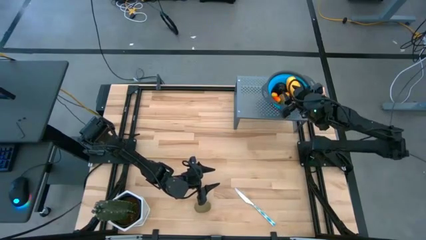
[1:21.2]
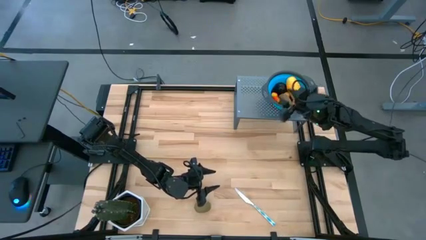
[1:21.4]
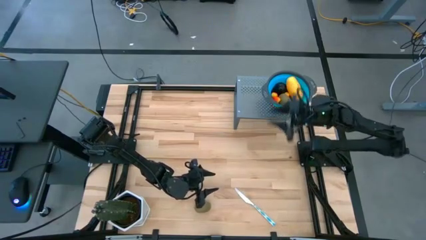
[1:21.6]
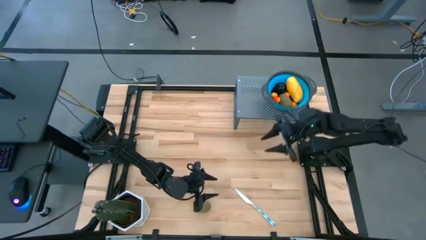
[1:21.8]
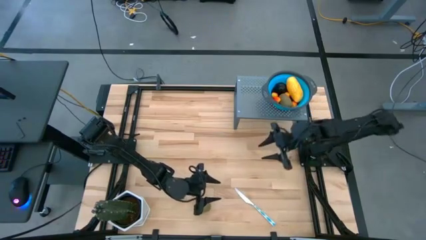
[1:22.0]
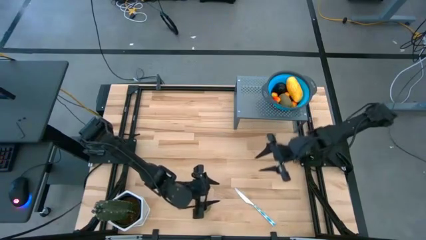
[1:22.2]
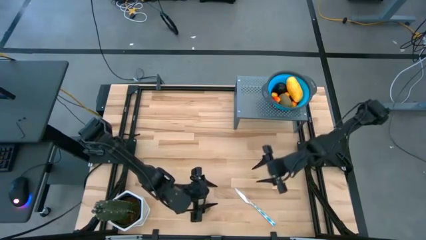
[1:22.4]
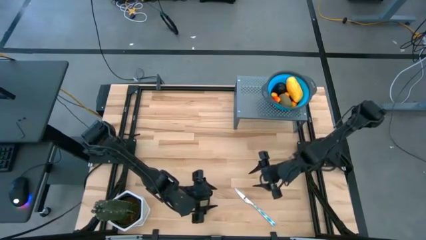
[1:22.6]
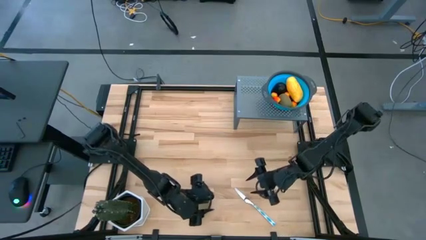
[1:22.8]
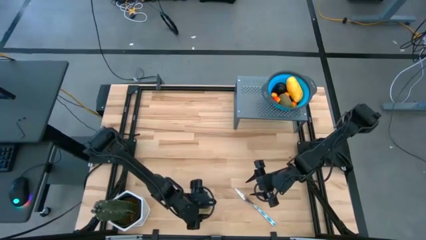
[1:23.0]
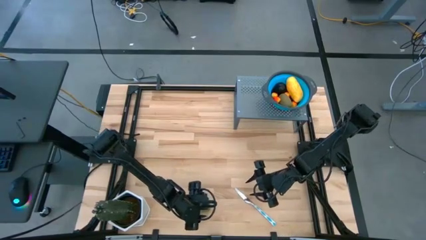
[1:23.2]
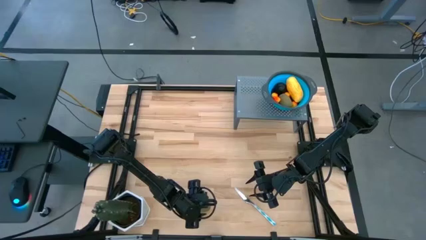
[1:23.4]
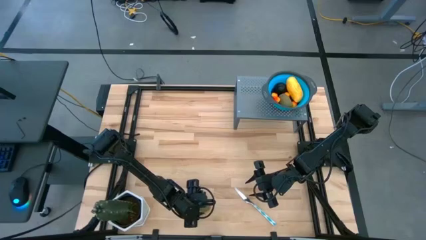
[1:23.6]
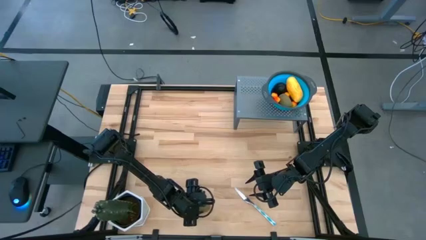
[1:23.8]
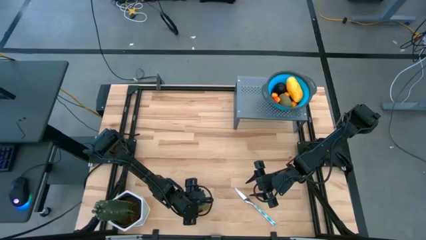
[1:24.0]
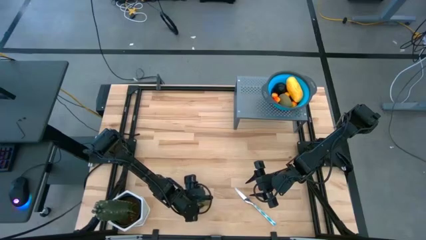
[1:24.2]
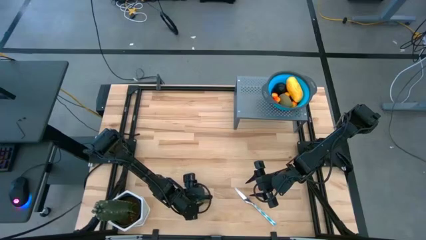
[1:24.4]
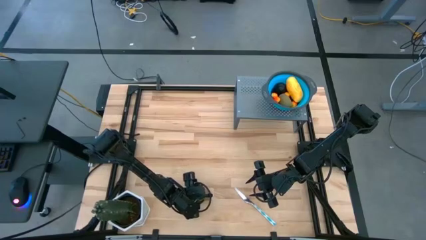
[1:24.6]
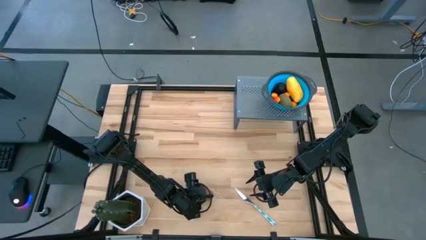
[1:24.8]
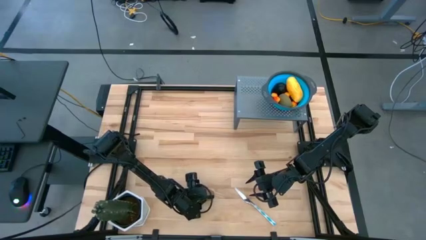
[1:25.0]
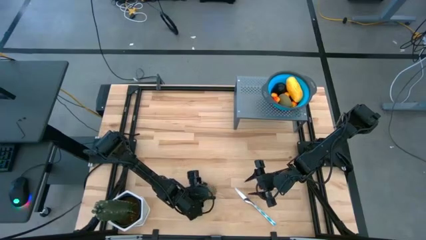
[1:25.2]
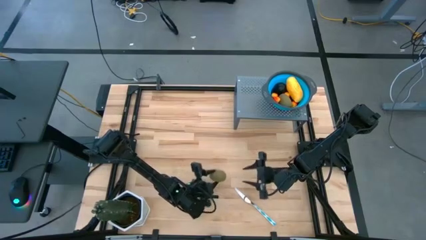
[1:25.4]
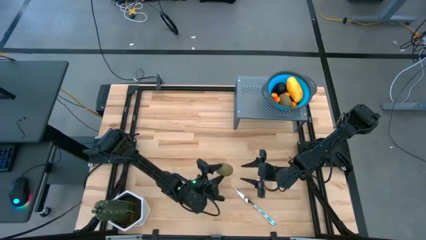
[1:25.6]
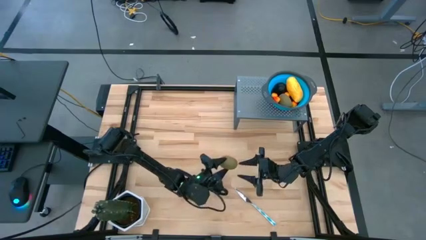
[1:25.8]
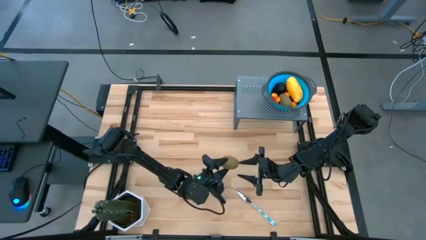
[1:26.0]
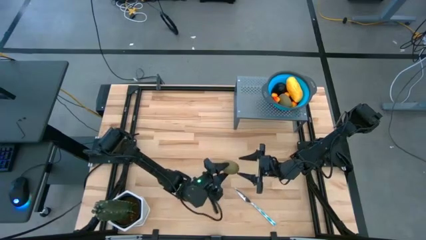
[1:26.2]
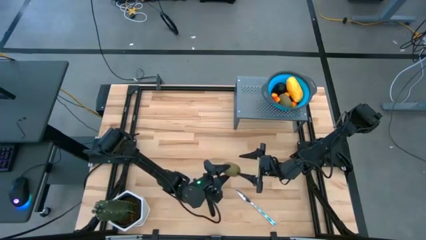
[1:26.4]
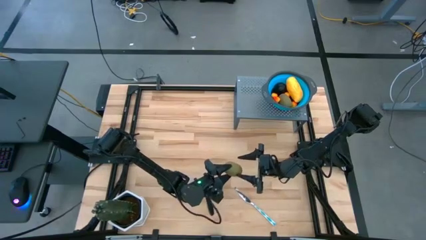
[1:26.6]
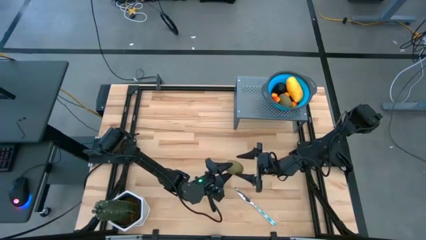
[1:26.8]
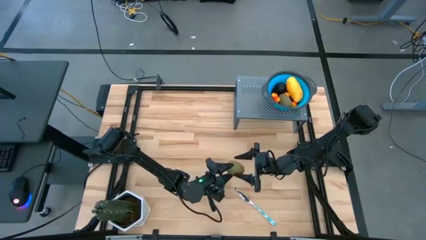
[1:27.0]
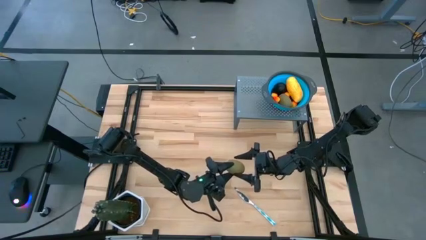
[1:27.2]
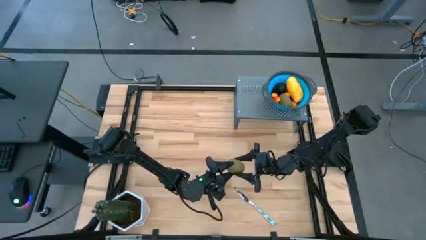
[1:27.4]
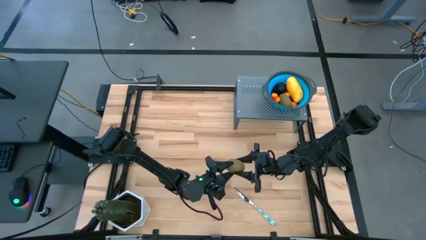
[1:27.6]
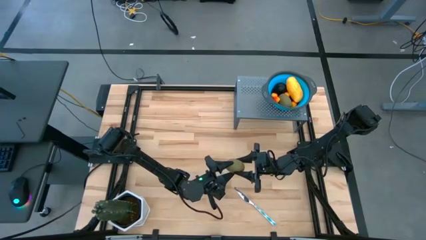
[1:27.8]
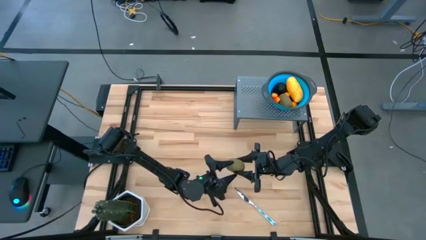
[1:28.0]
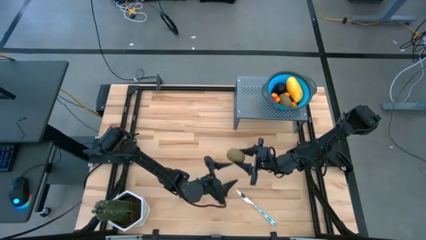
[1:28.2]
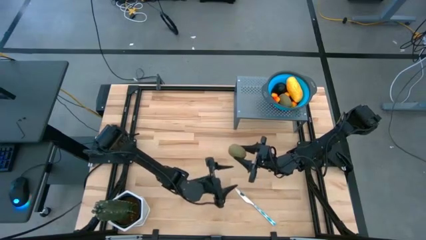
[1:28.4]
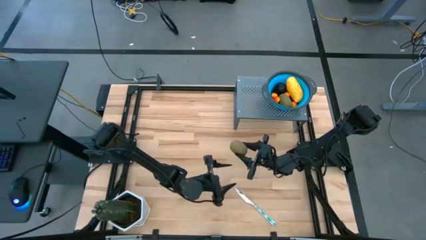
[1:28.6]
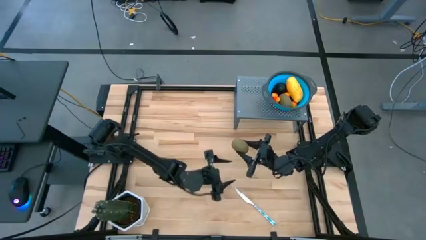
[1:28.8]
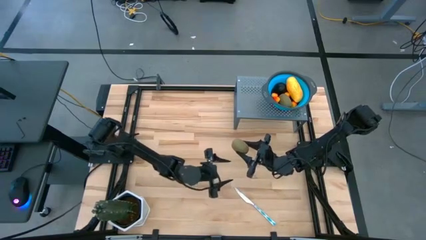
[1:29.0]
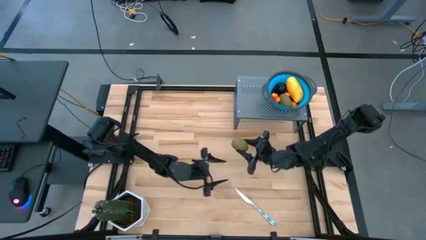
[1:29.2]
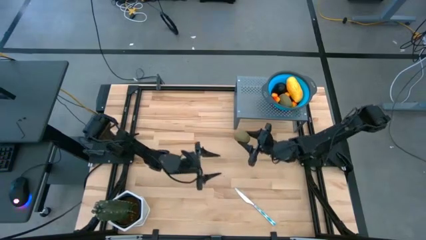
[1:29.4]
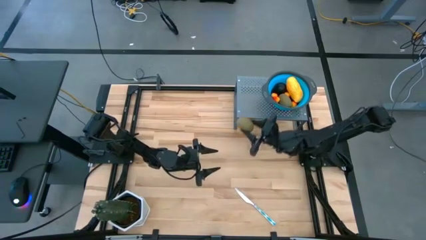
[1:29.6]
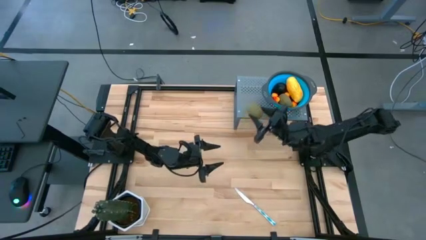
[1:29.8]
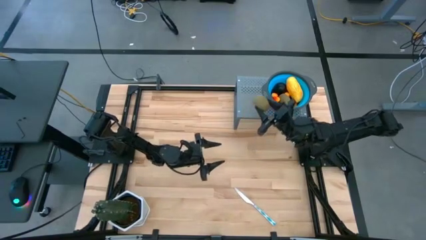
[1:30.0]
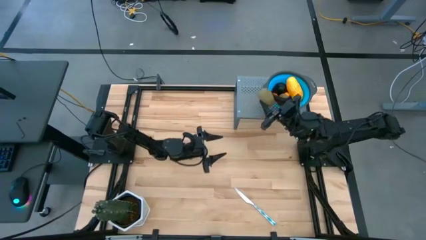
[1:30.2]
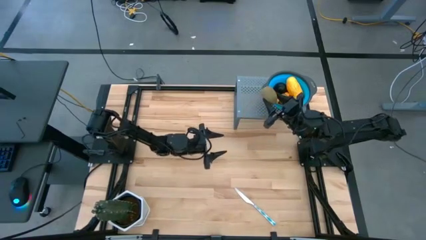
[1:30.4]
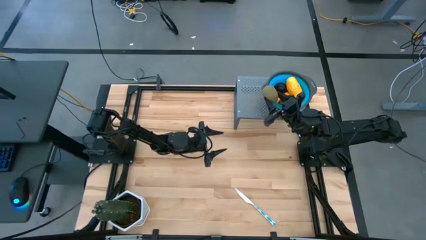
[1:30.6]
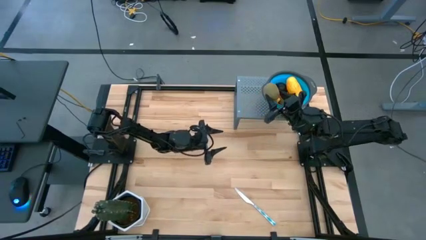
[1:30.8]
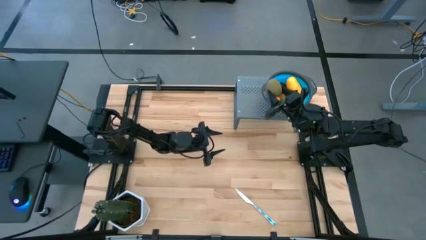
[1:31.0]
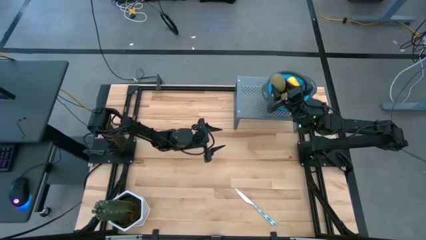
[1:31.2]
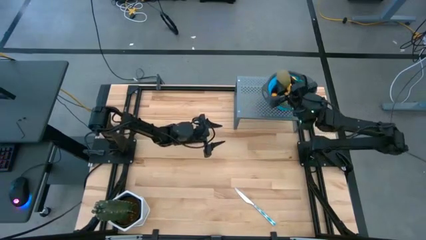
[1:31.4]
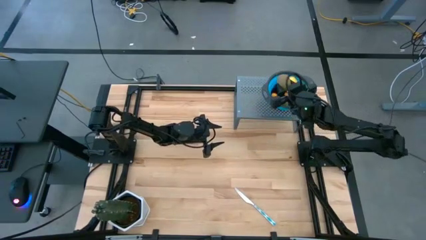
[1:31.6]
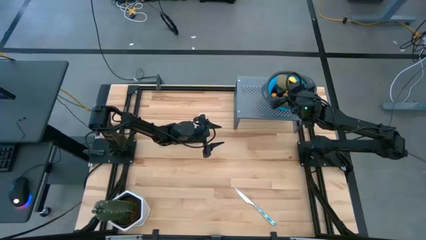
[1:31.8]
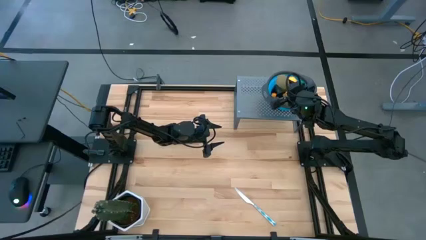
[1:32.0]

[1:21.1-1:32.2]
Task: Pick & Place Fruit
Put the brown kiwi into the blue strainer bowl on the shelf
